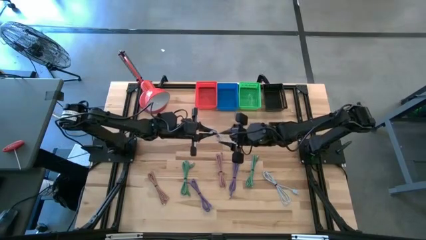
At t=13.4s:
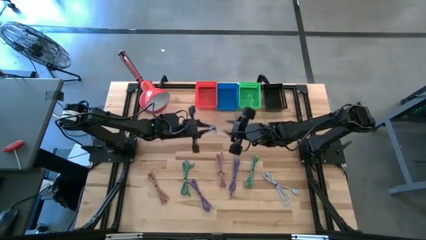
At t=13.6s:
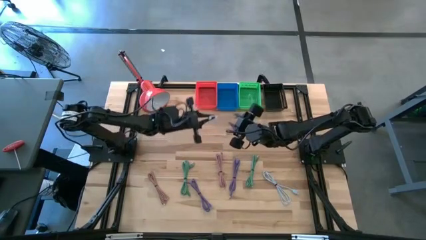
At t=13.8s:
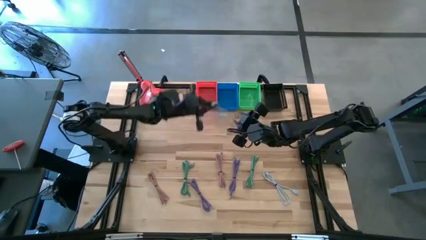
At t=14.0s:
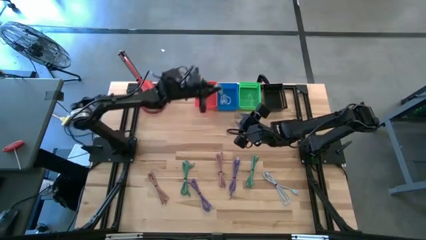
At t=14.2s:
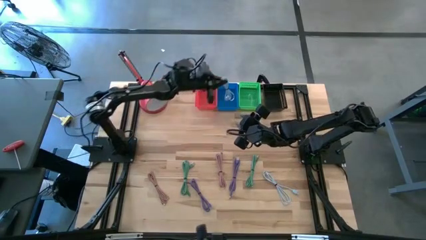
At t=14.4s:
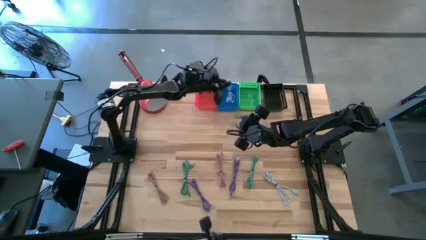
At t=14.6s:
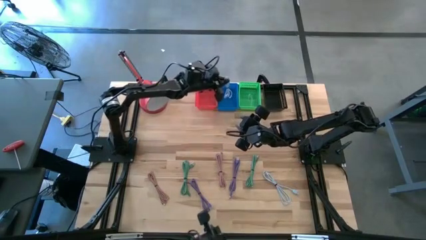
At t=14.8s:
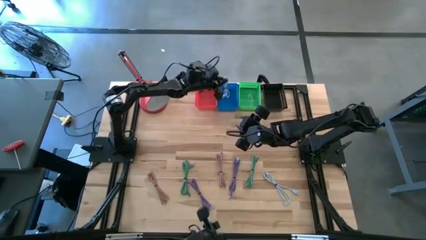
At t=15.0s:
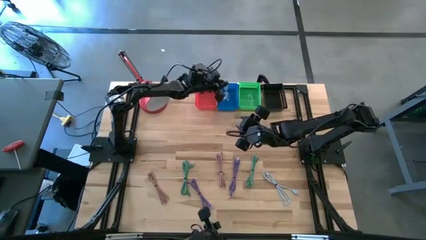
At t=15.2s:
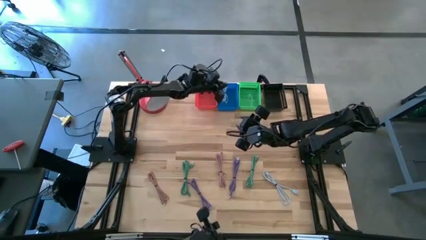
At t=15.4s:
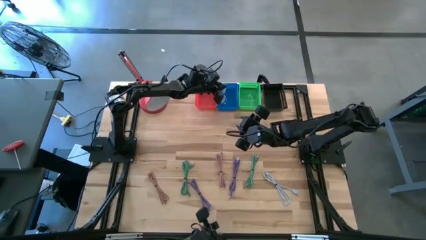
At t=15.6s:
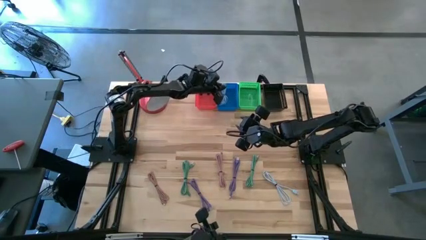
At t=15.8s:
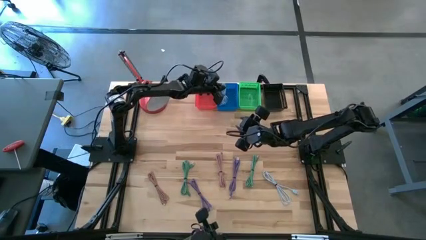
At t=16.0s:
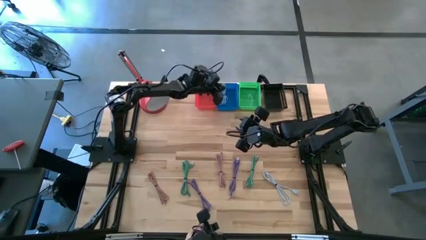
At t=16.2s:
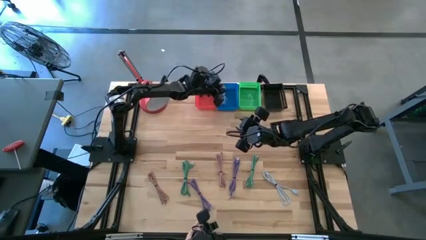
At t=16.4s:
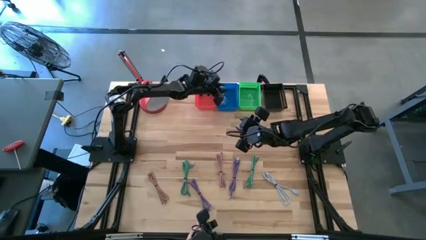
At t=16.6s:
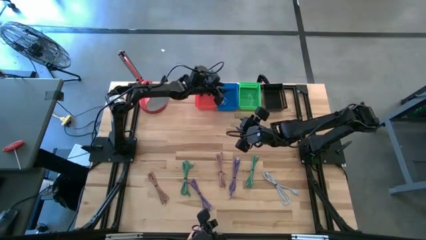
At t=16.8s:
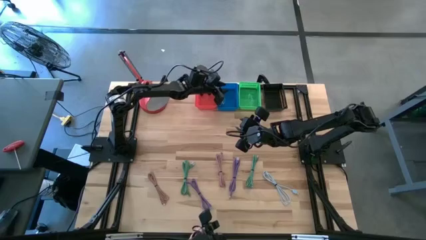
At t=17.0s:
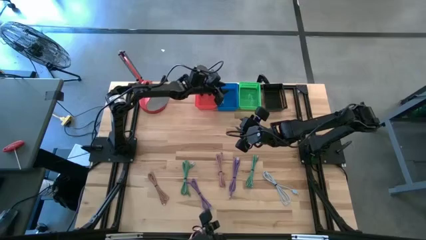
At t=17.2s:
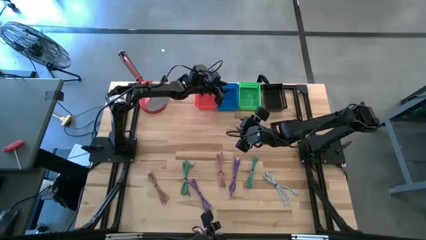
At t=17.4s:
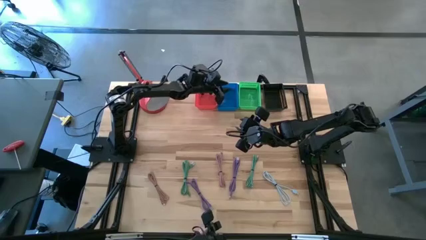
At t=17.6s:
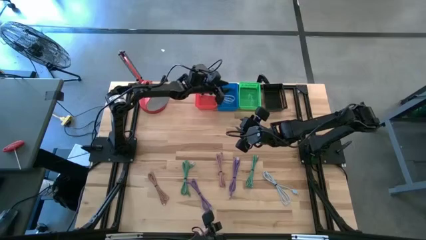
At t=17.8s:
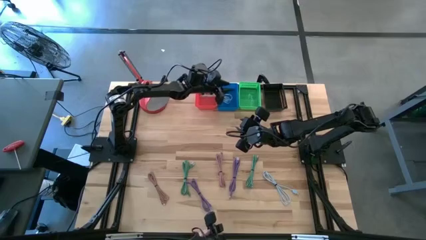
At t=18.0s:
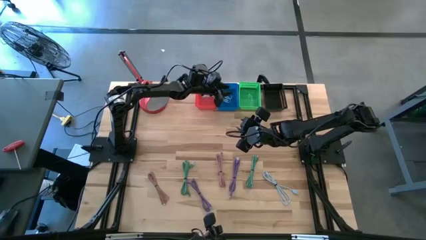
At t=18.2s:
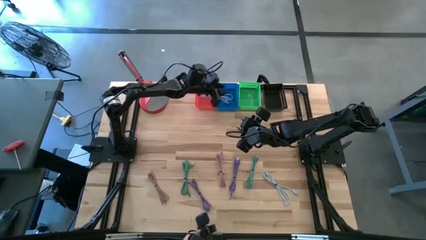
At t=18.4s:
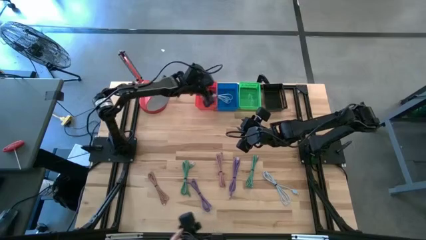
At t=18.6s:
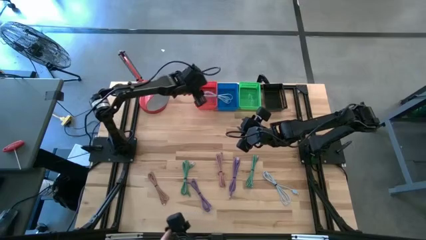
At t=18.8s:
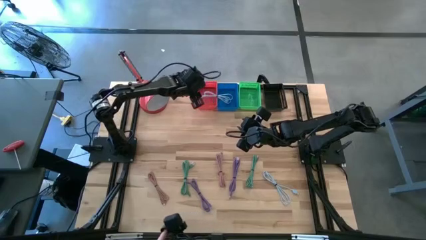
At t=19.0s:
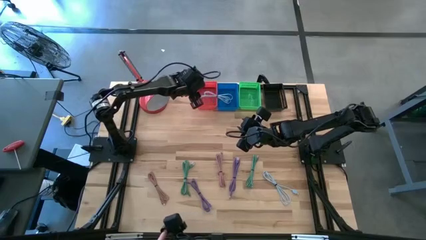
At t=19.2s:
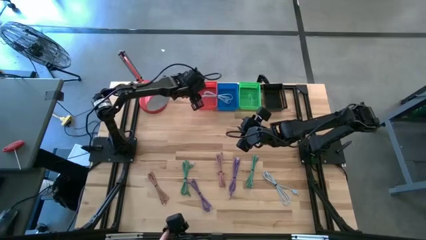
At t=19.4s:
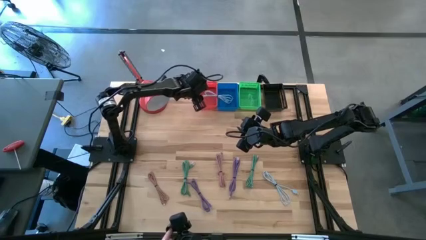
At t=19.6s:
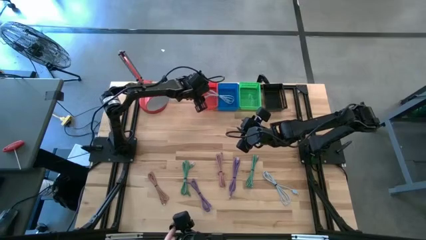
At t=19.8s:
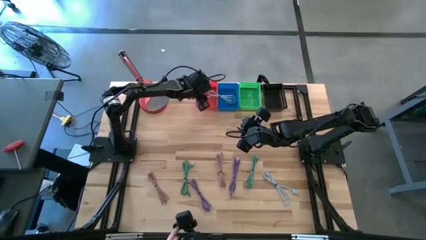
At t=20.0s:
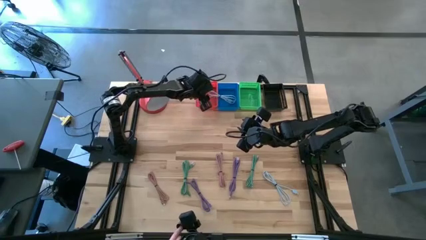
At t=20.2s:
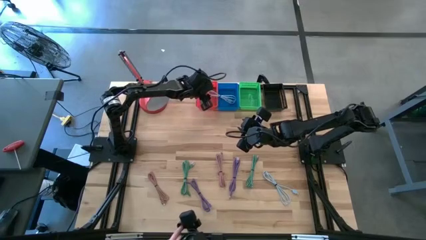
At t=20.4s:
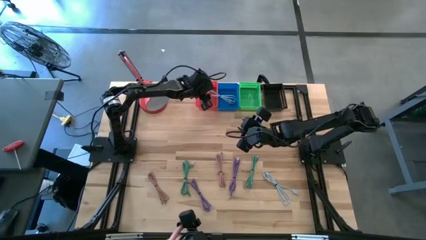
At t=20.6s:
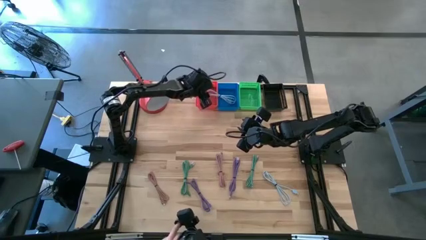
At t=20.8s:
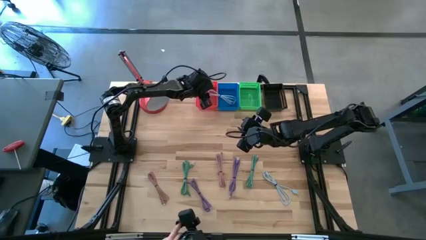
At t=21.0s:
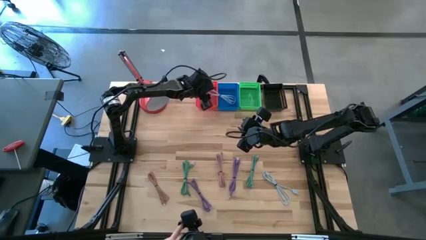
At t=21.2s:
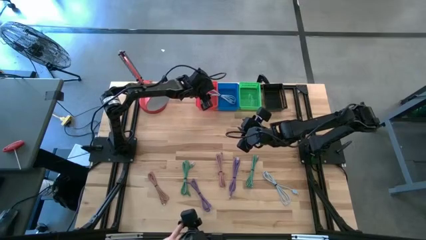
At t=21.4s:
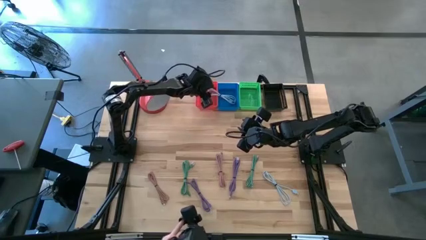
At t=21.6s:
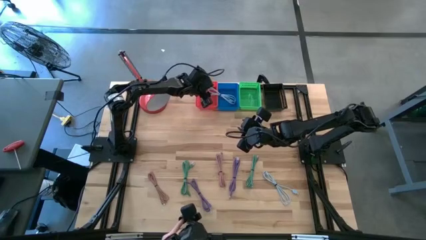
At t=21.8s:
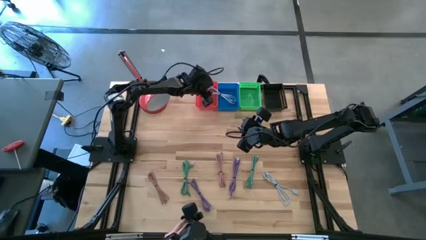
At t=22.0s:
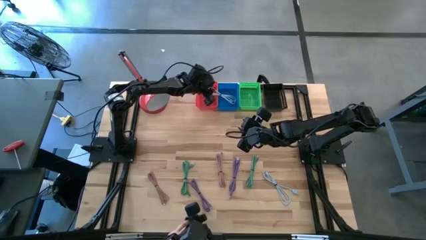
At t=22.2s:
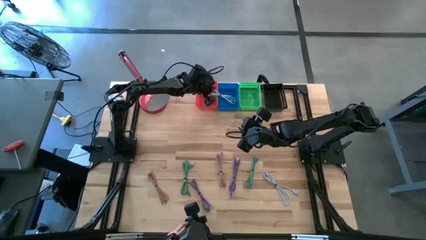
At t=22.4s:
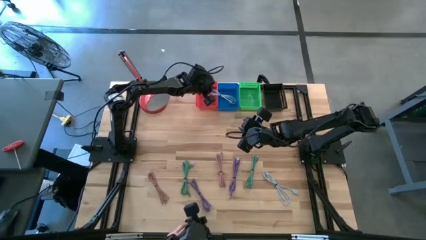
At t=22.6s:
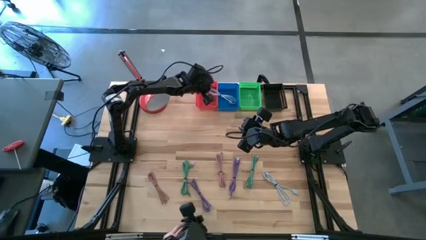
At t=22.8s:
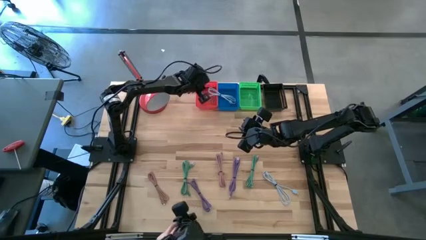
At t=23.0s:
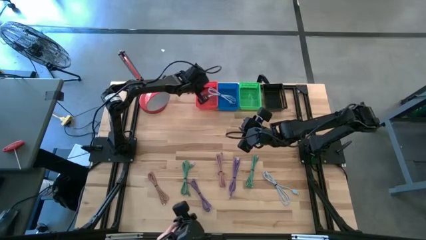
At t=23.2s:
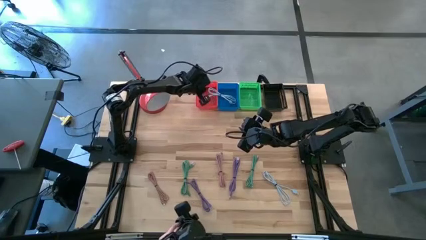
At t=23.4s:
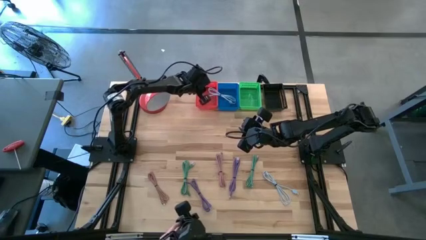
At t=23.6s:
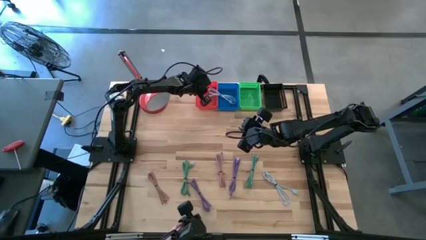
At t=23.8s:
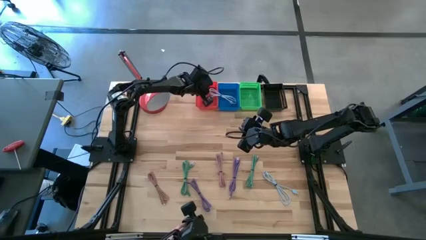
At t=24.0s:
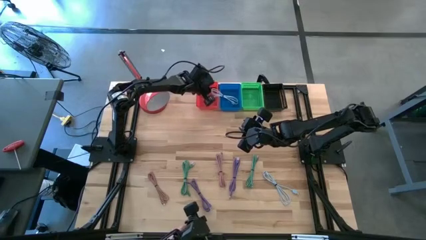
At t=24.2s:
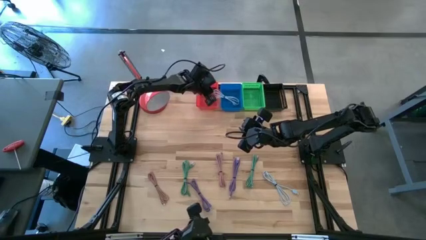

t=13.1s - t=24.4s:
Task: Pick & Place USB Port
Put the right blue charger cable into the blue bin

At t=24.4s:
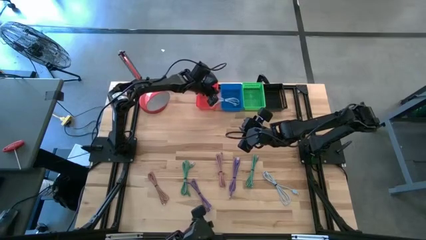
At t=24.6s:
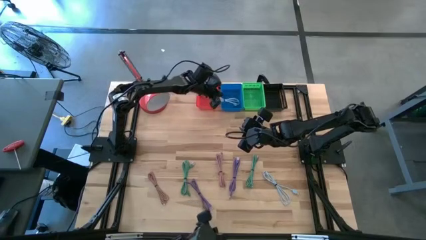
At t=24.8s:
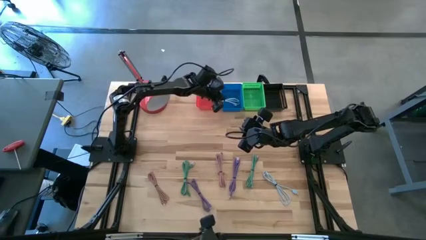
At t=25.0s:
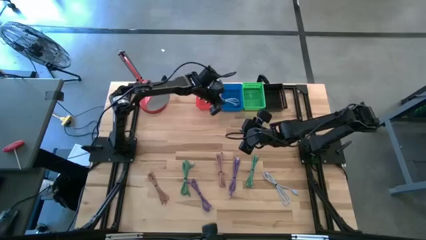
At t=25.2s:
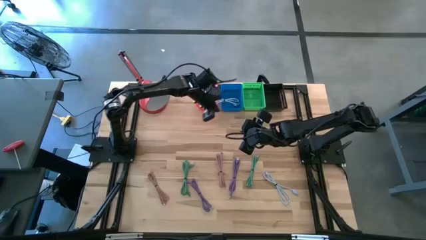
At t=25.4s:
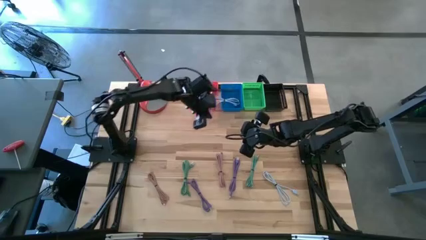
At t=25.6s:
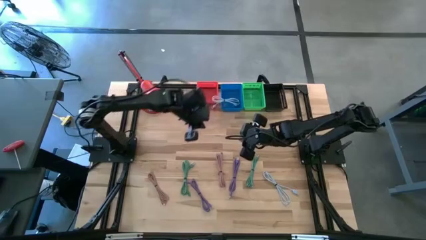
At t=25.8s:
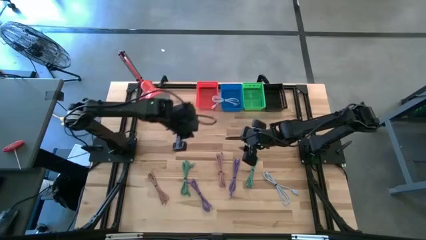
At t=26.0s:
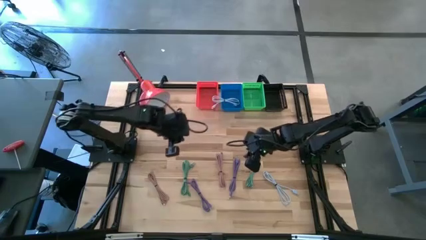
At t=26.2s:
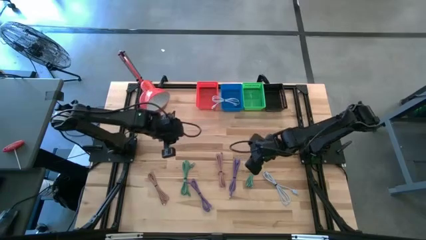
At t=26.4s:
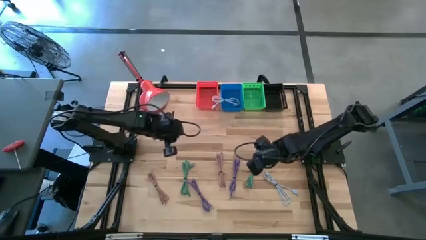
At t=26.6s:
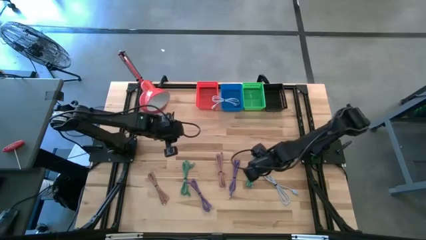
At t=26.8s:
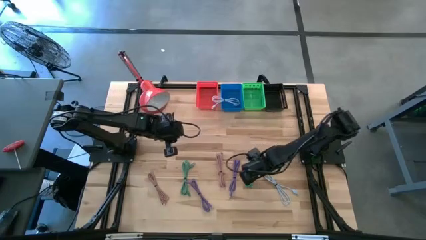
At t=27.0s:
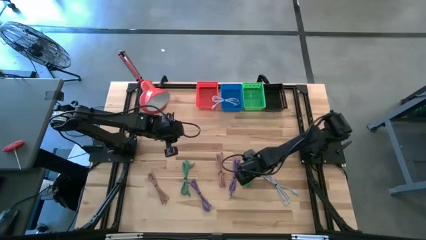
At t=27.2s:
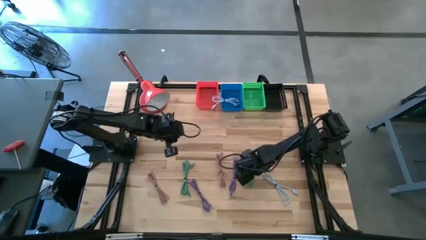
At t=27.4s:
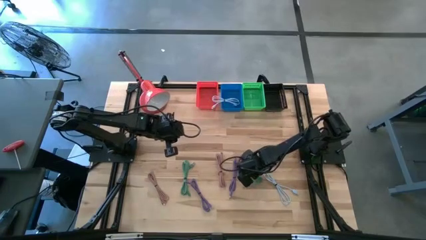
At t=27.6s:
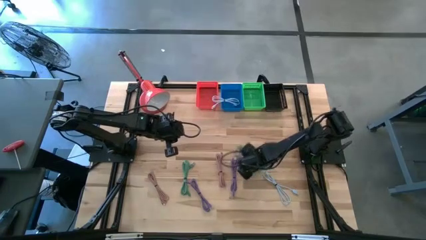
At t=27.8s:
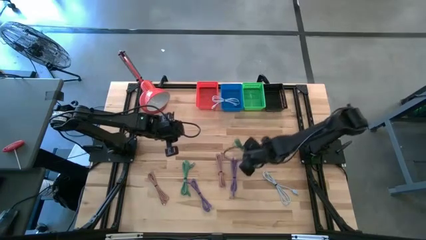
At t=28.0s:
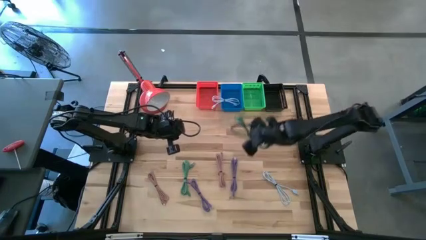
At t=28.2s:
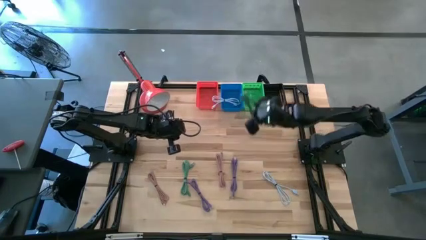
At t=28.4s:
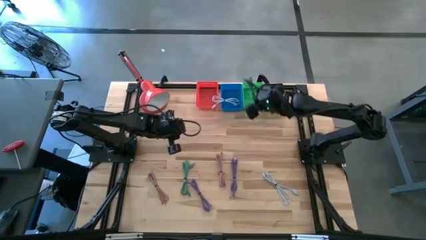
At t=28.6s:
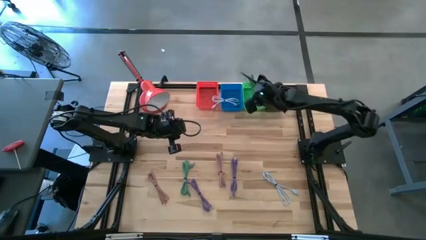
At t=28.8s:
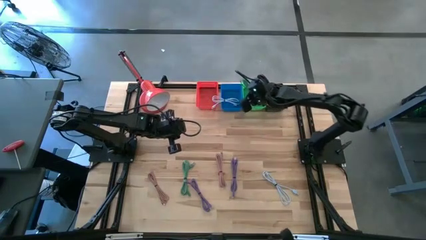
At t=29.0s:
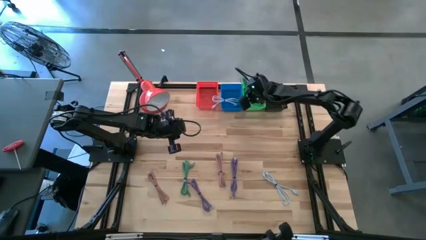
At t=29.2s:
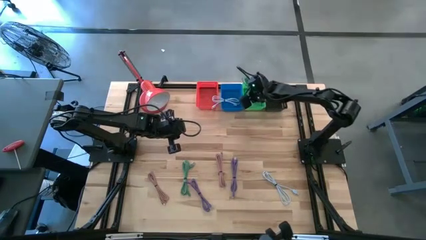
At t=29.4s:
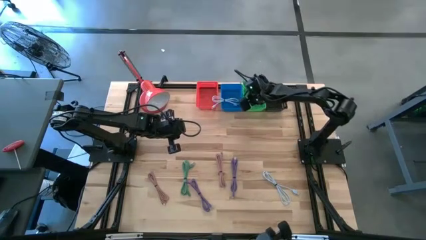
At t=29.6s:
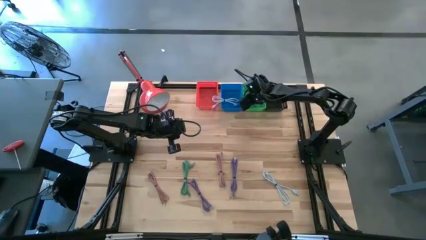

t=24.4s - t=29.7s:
Put the right green charger cable into the green bin
